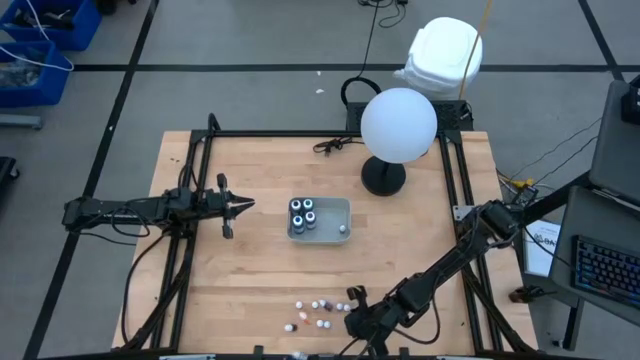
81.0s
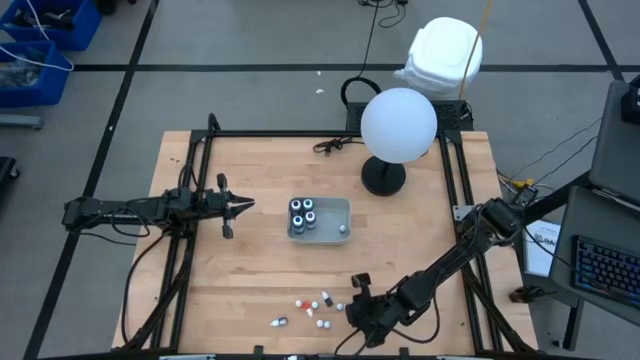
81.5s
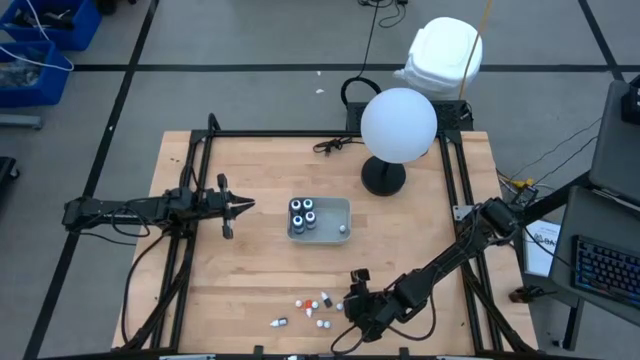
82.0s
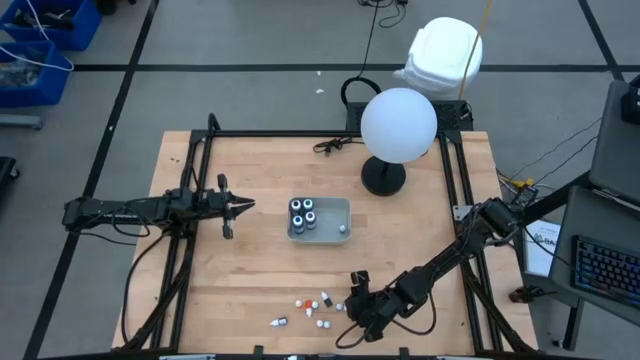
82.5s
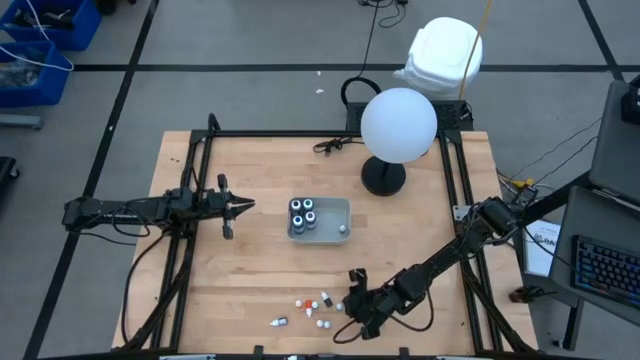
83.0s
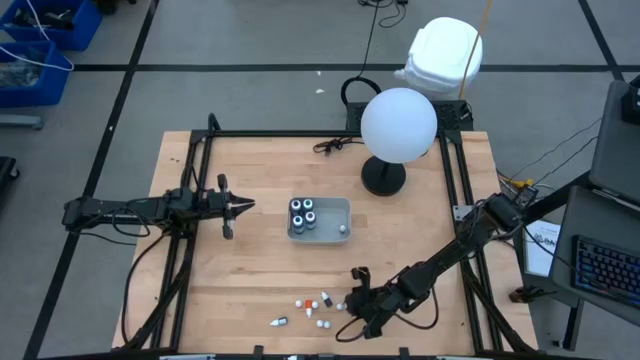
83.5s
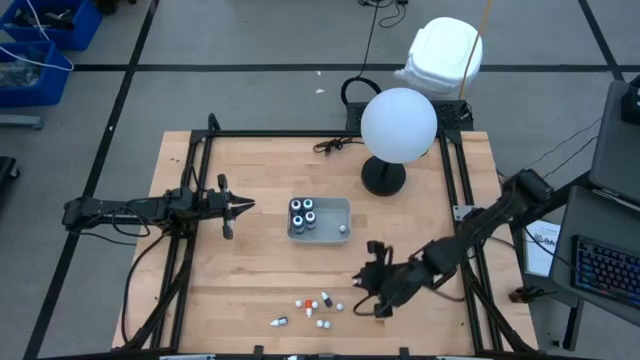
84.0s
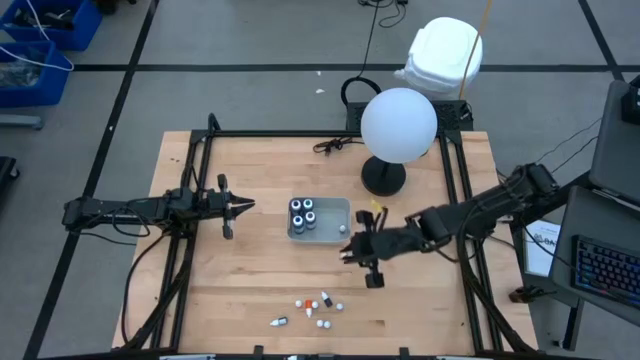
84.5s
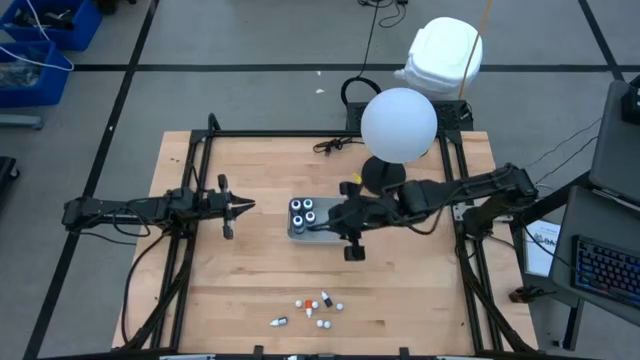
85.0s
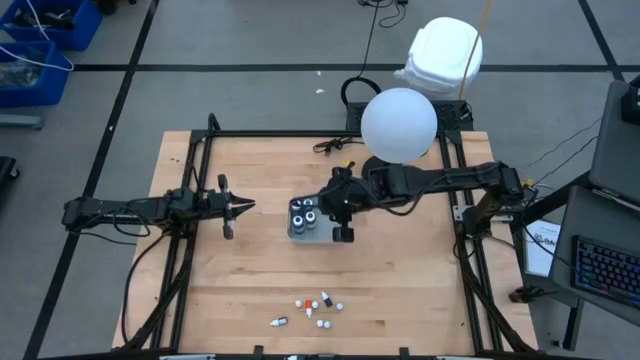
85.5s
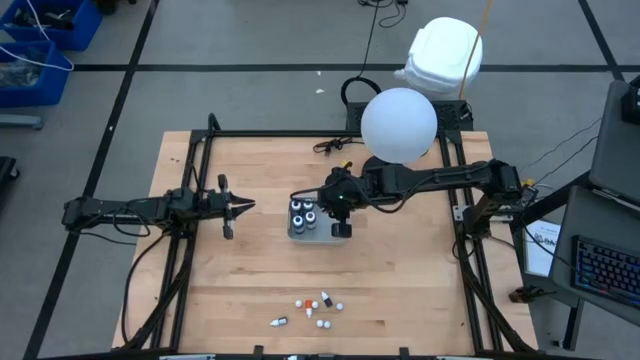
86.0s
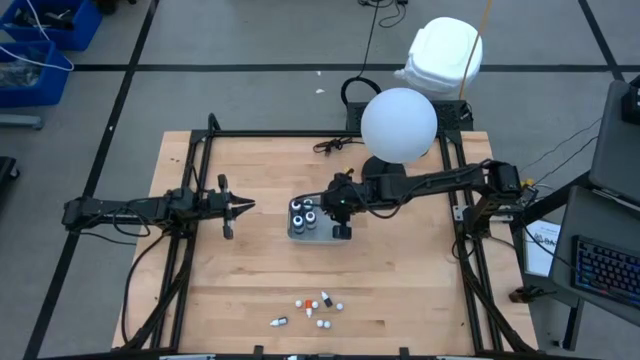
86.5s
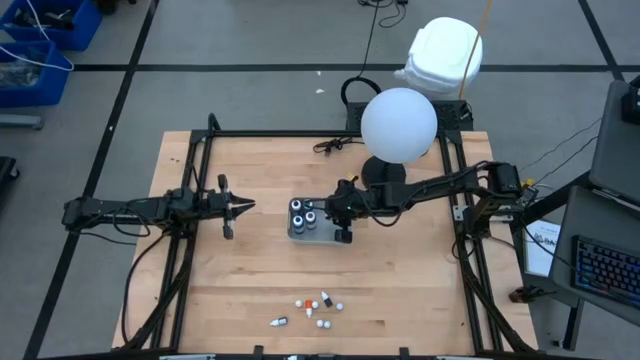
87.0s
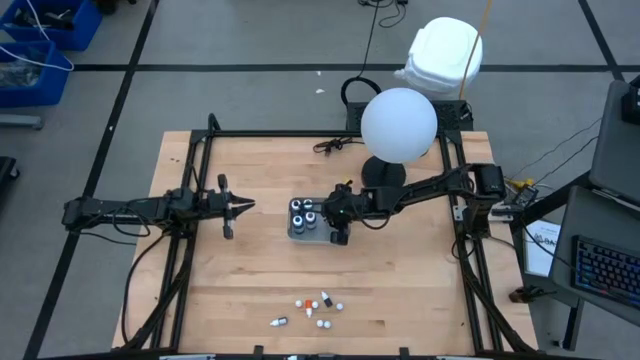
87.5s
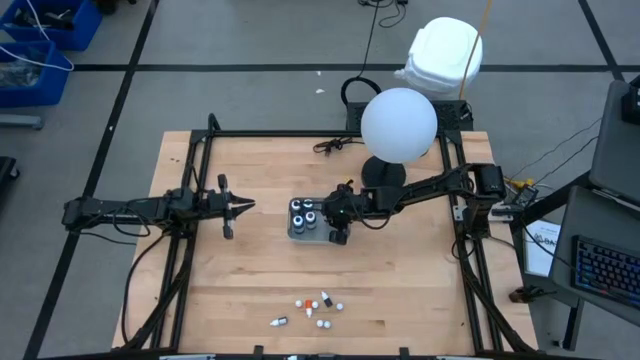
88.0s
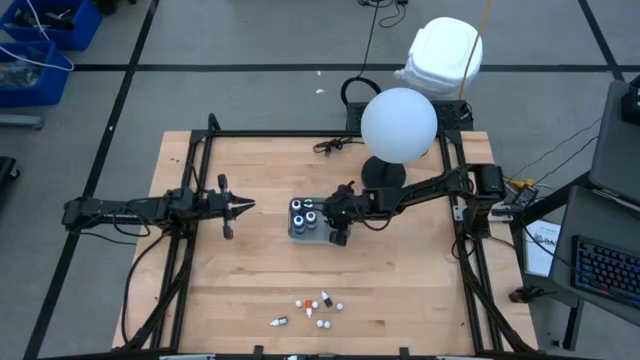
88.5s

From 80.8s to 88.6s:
Task: Pick & Place food coloring
Put the small orange food coloring bottle into the gray bin

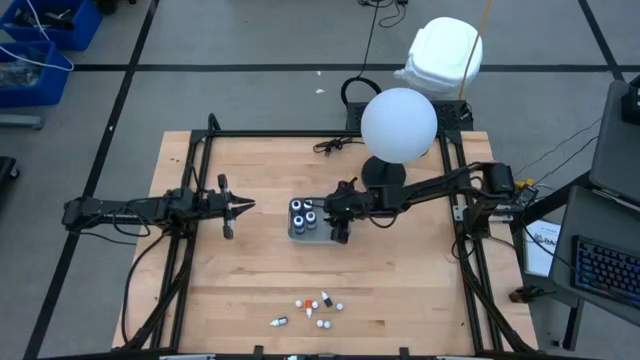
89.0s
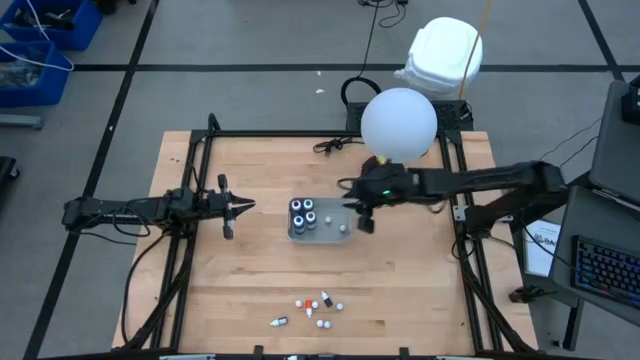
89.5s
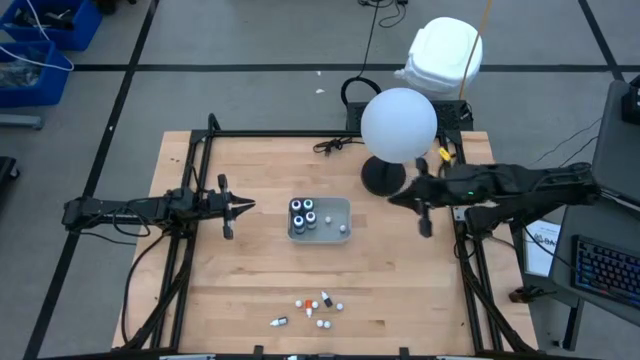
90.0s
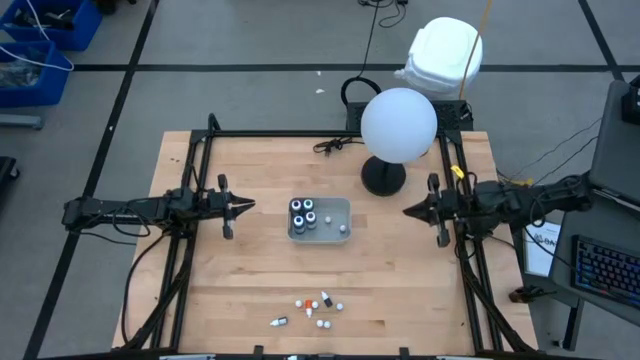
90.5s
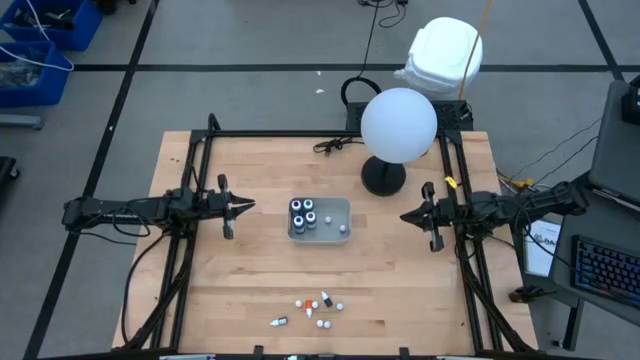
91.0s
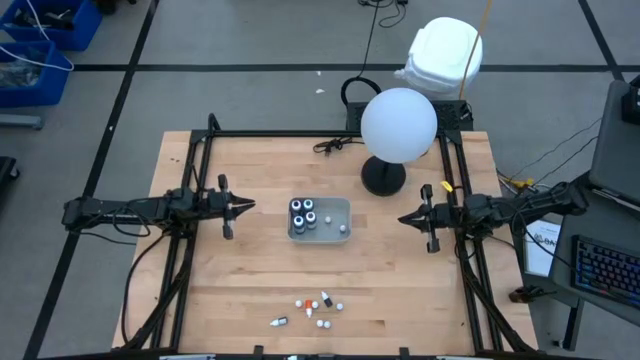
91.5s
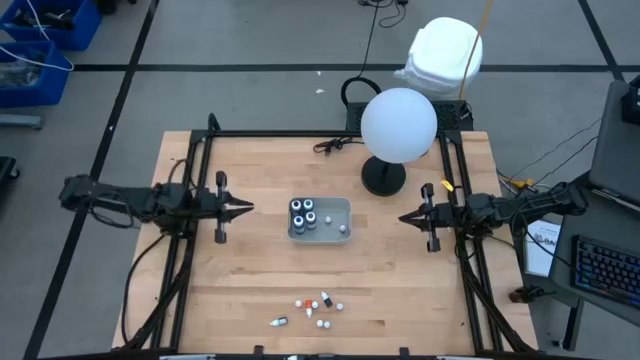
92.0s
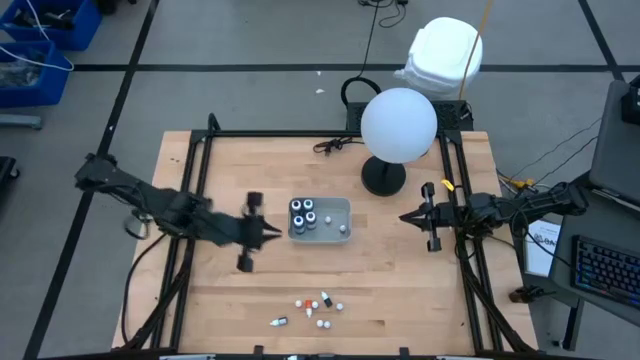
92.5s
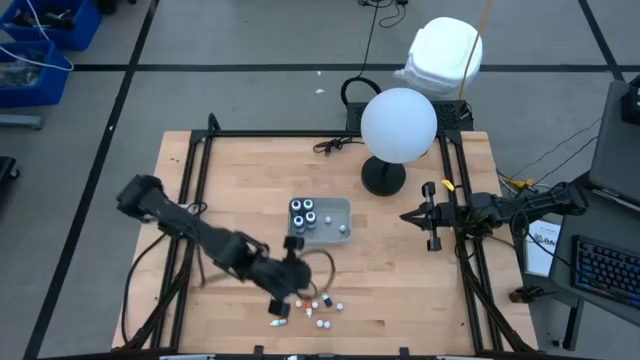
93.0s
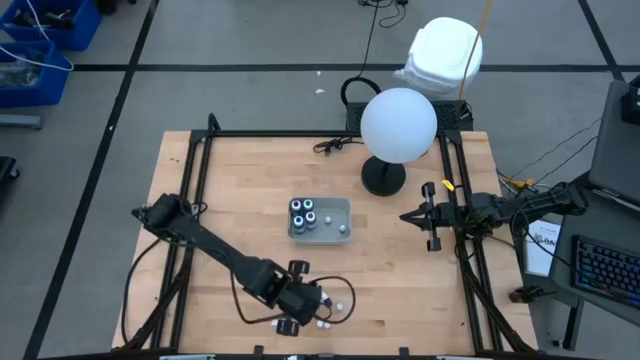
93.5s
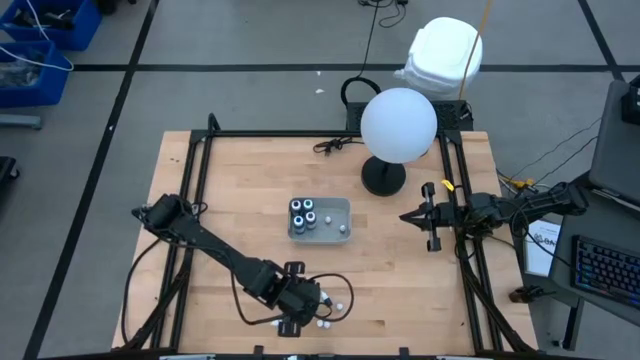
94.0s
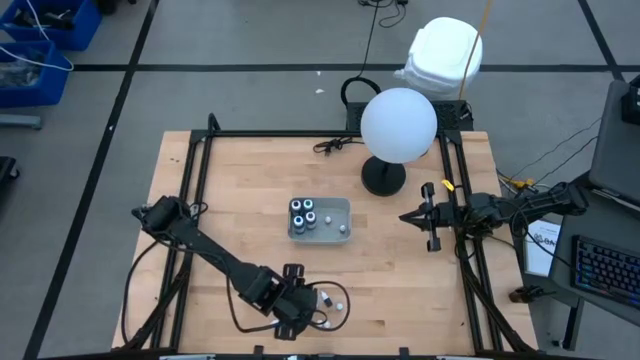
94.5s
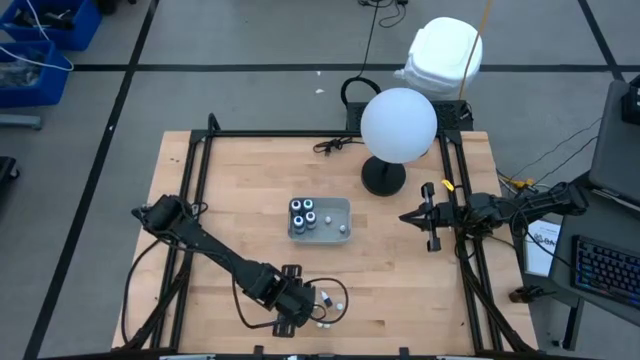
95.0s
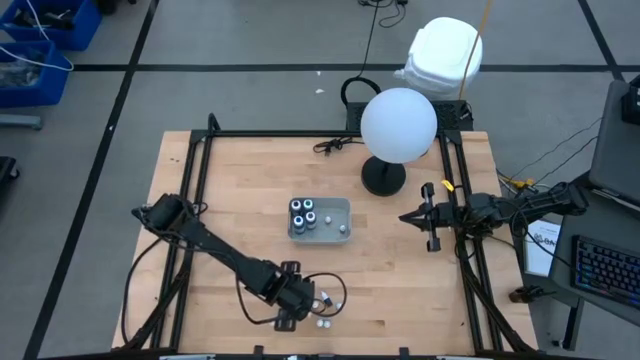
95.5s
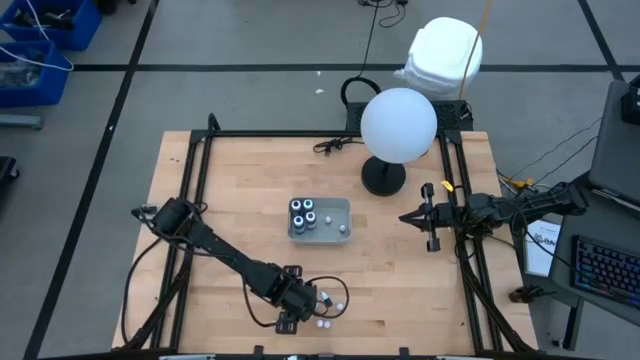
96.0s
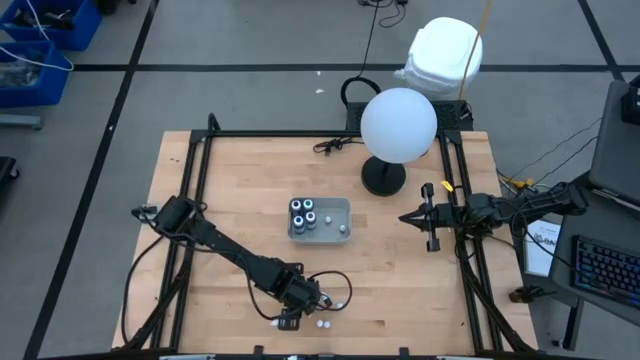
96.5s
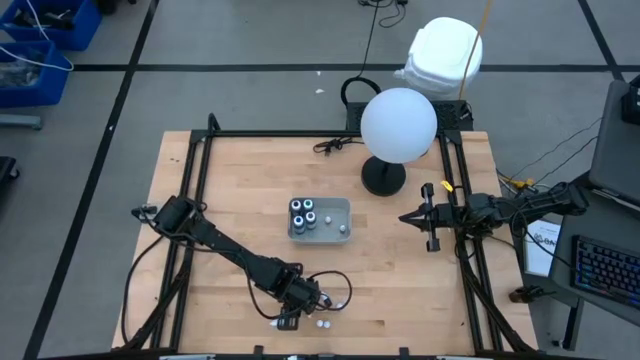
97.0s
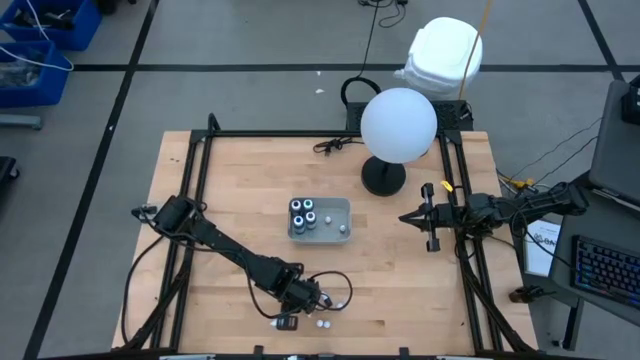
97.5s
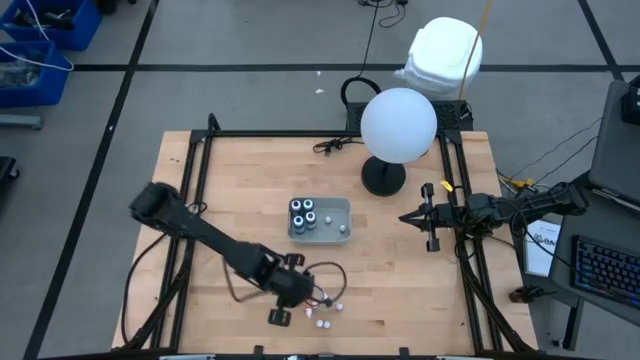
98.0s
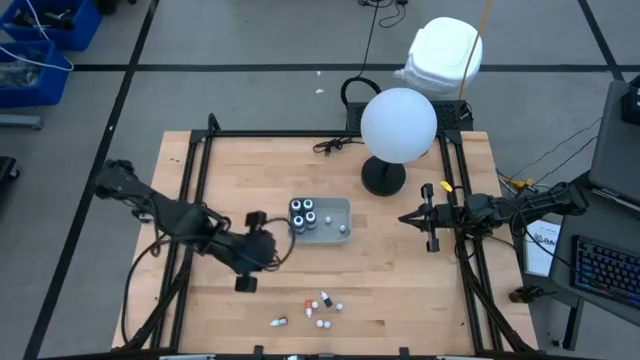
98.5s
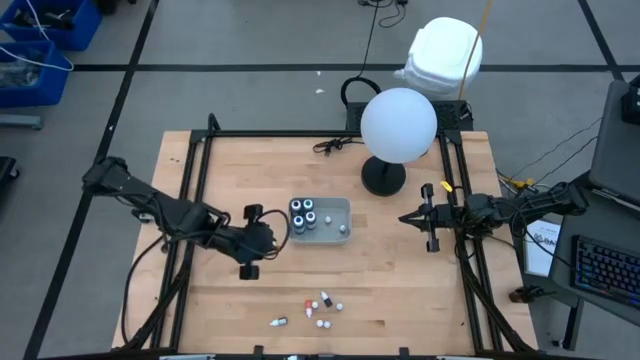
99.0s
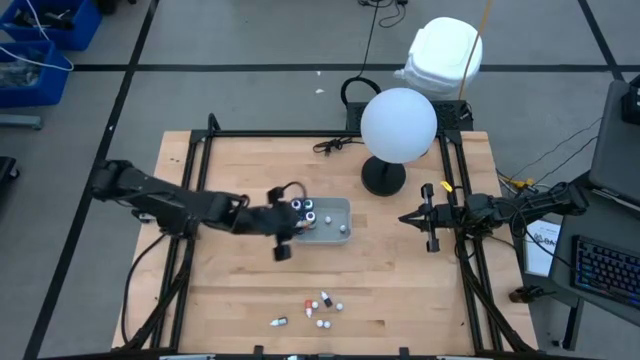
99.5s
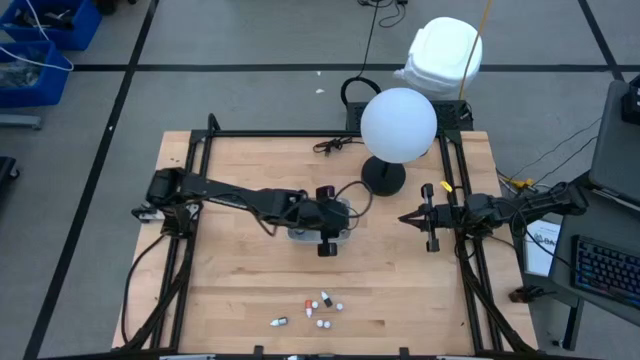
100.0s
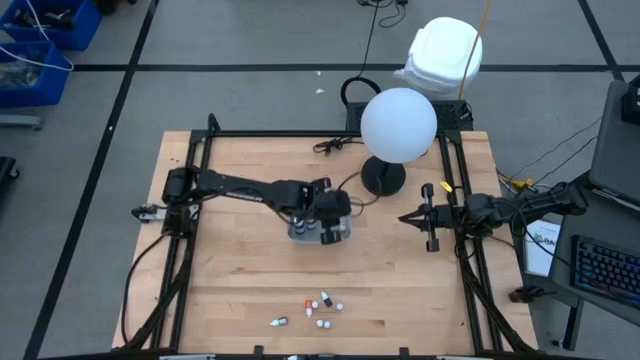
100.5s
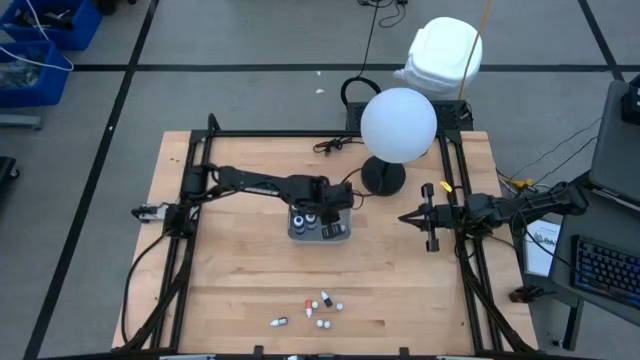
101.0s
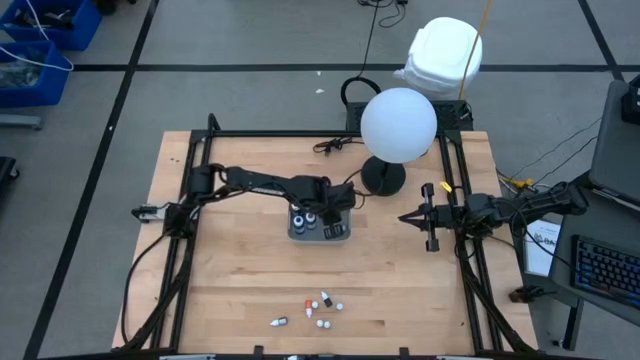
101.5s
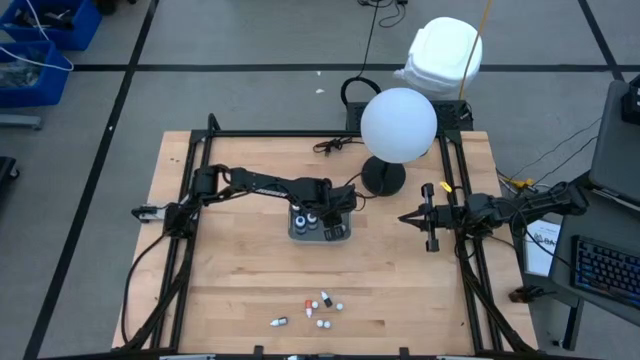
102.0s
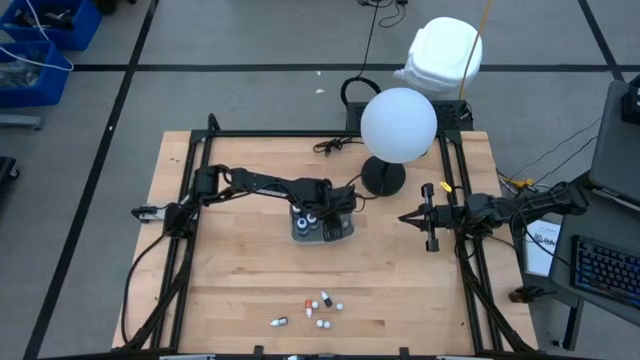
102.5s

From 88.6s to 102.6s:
Put the left small orange food coloring bottle into the gray bin
